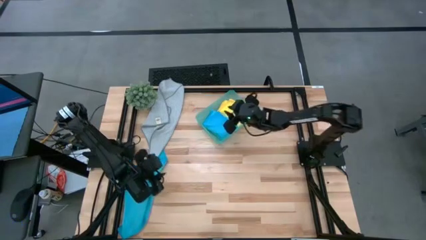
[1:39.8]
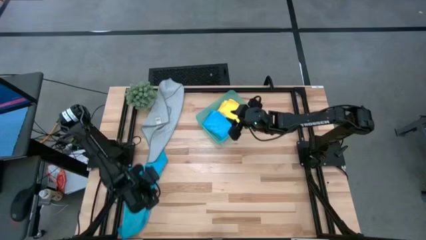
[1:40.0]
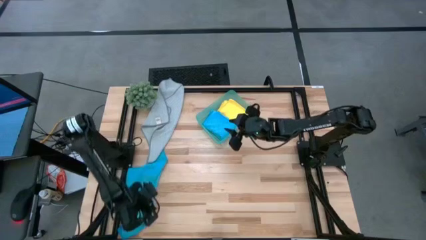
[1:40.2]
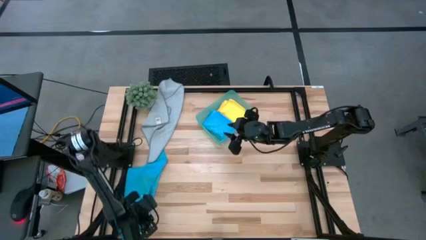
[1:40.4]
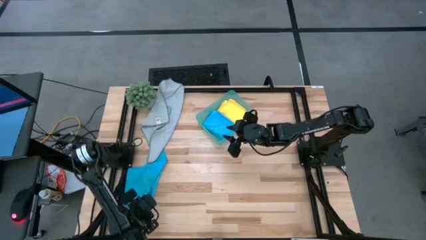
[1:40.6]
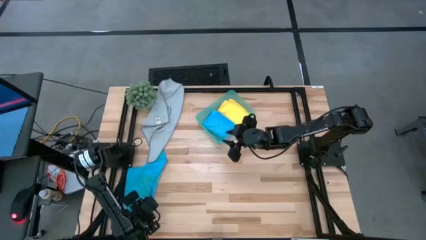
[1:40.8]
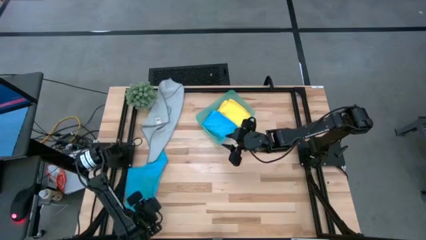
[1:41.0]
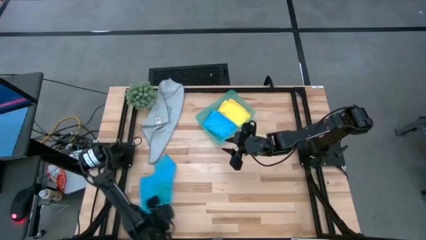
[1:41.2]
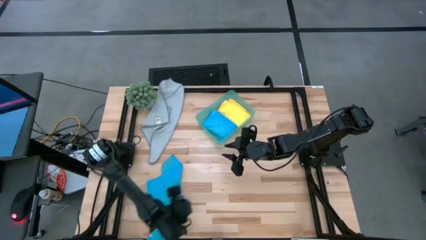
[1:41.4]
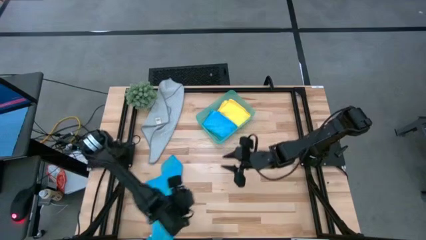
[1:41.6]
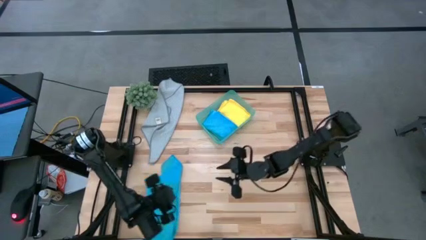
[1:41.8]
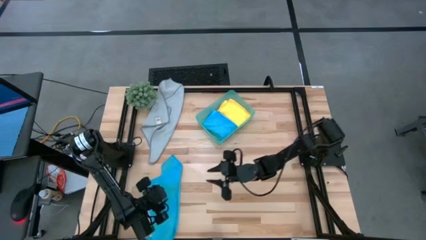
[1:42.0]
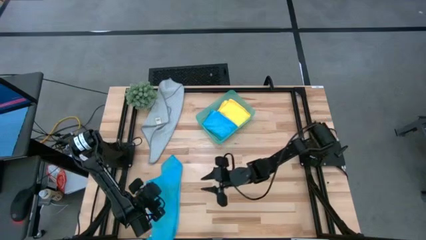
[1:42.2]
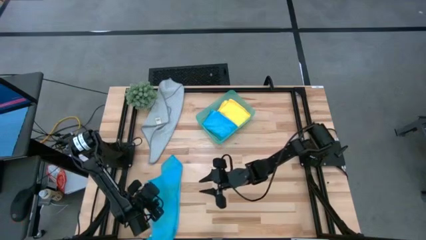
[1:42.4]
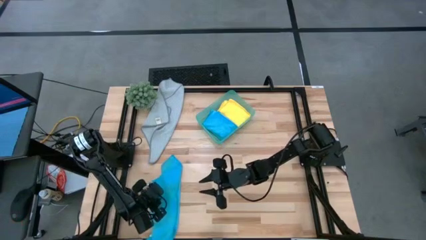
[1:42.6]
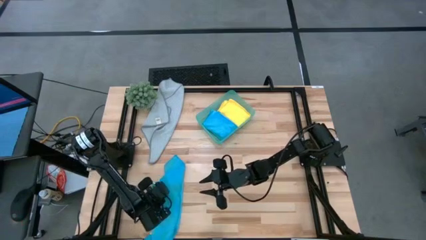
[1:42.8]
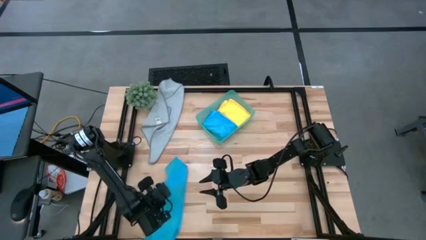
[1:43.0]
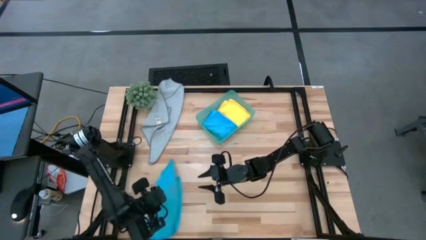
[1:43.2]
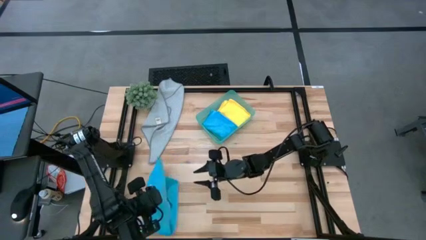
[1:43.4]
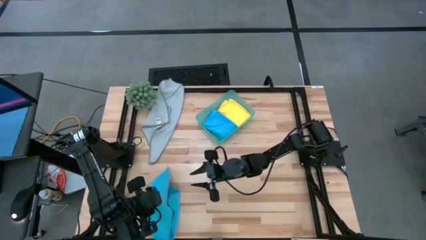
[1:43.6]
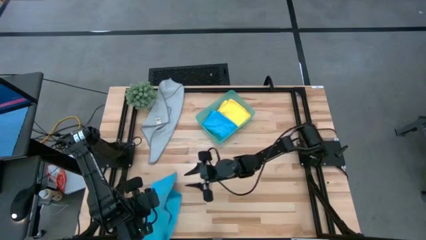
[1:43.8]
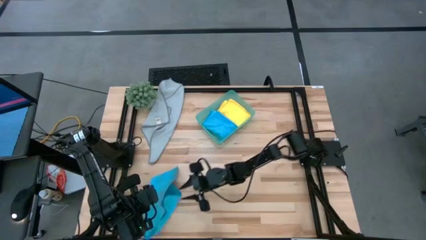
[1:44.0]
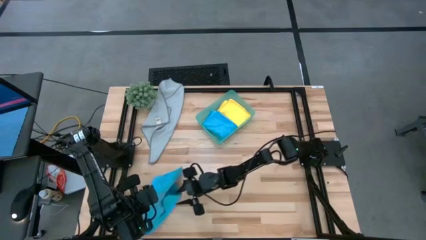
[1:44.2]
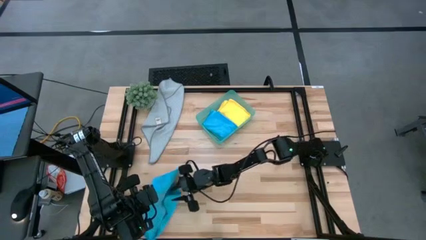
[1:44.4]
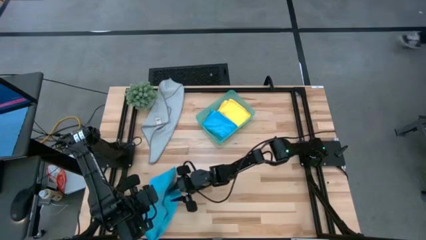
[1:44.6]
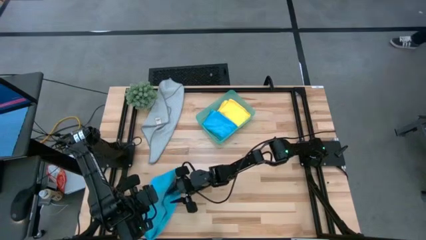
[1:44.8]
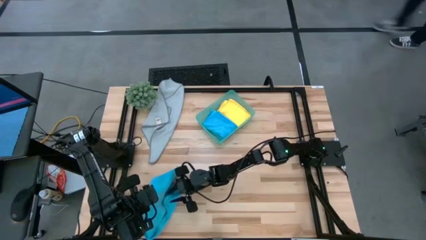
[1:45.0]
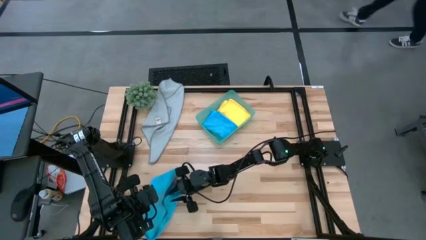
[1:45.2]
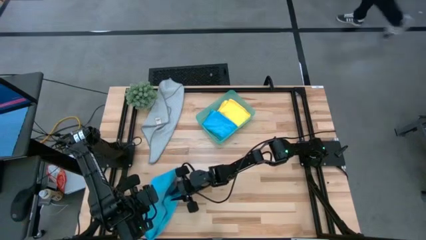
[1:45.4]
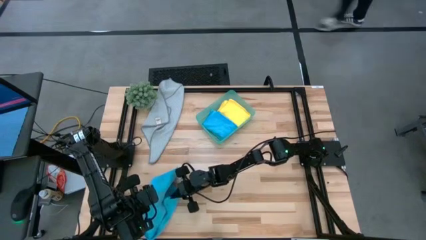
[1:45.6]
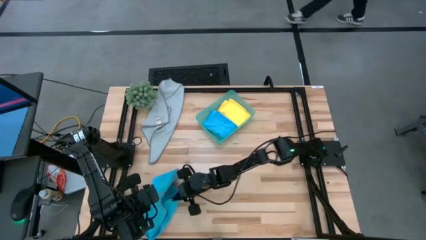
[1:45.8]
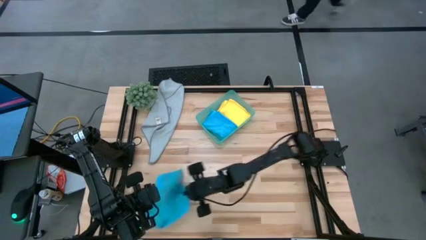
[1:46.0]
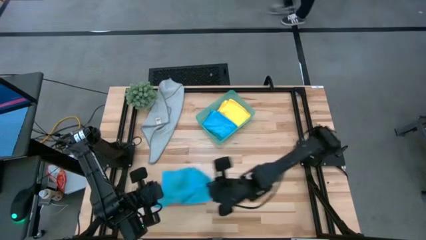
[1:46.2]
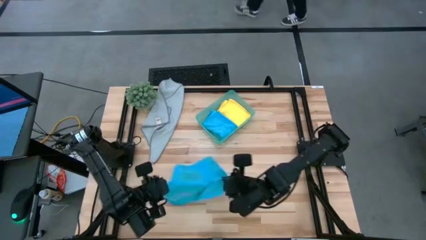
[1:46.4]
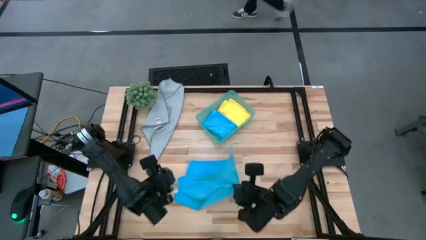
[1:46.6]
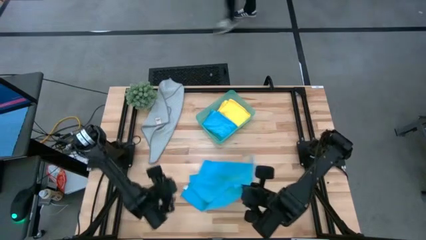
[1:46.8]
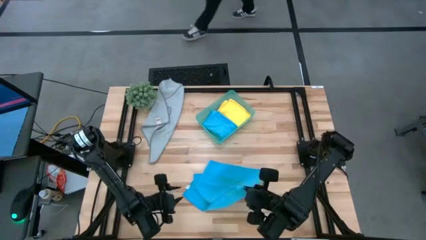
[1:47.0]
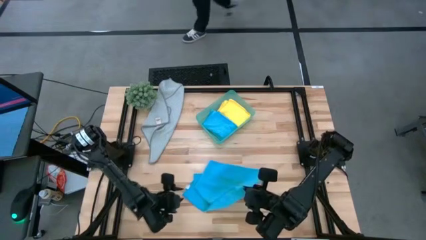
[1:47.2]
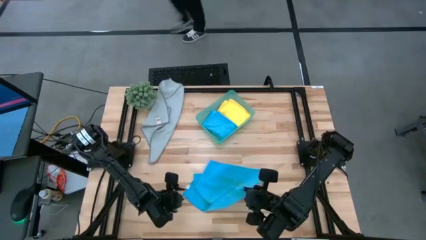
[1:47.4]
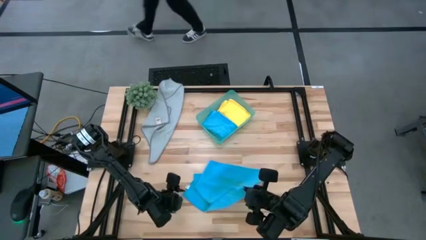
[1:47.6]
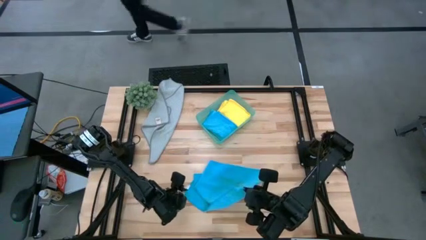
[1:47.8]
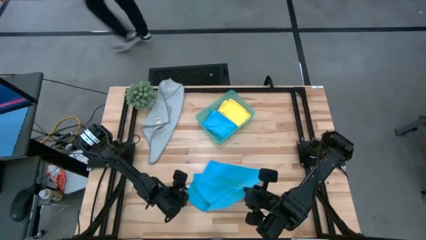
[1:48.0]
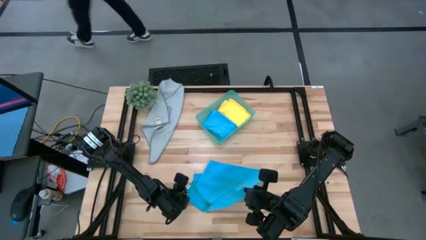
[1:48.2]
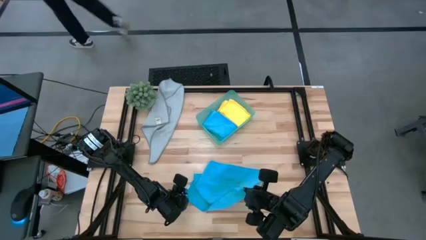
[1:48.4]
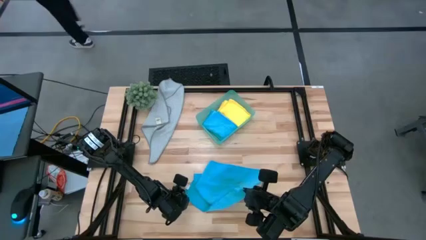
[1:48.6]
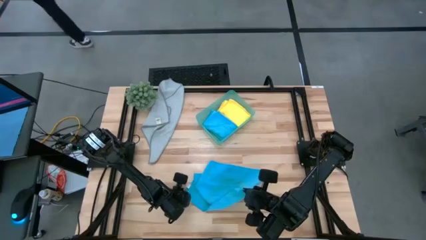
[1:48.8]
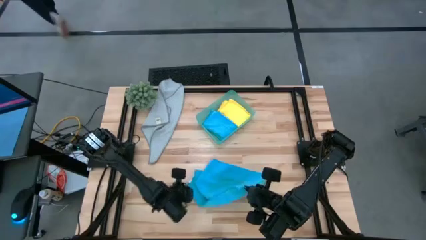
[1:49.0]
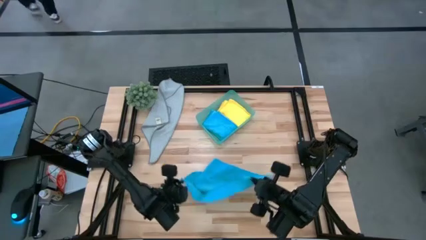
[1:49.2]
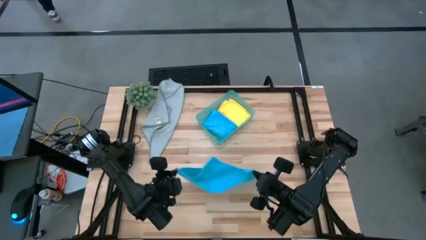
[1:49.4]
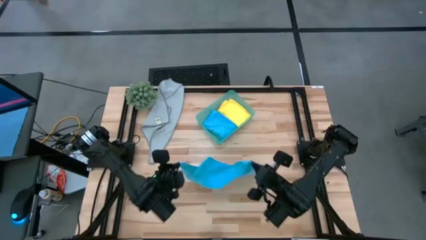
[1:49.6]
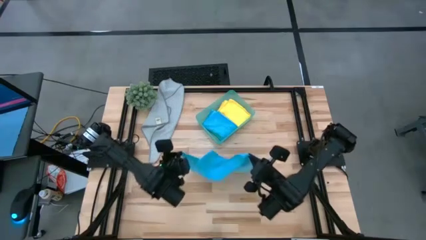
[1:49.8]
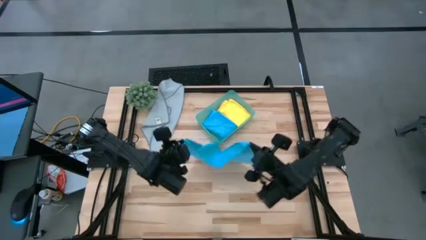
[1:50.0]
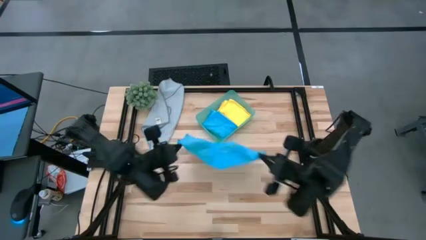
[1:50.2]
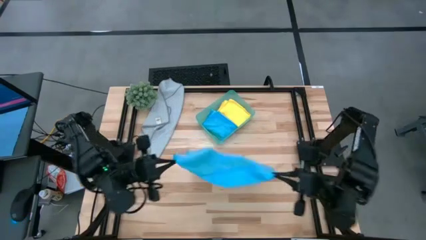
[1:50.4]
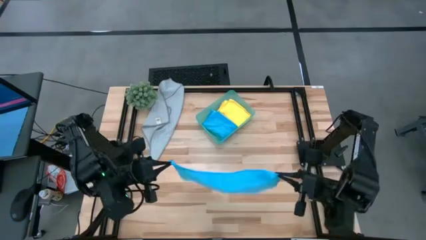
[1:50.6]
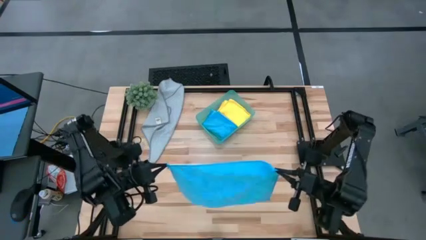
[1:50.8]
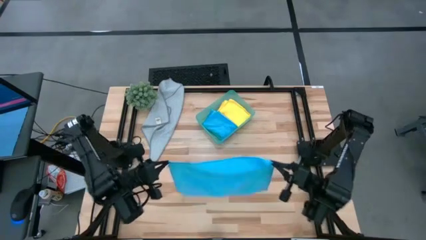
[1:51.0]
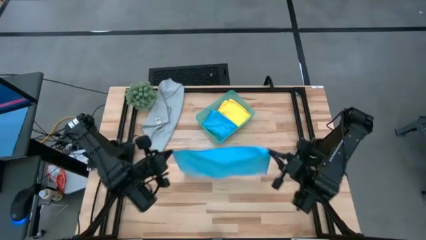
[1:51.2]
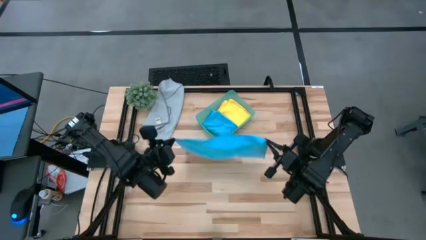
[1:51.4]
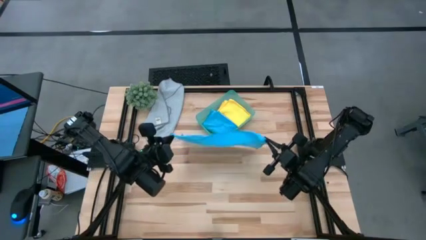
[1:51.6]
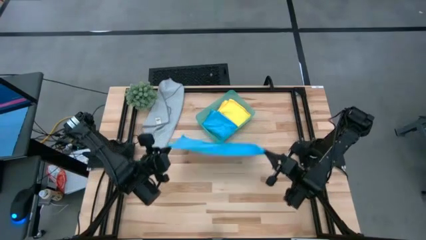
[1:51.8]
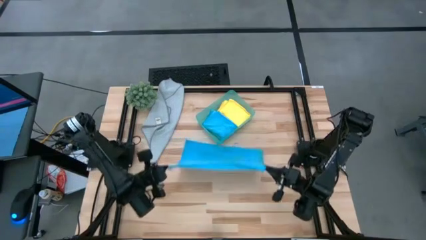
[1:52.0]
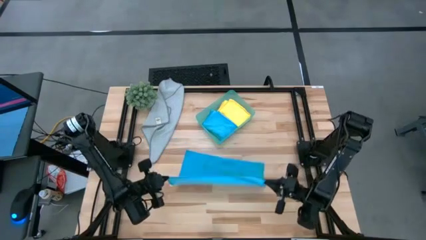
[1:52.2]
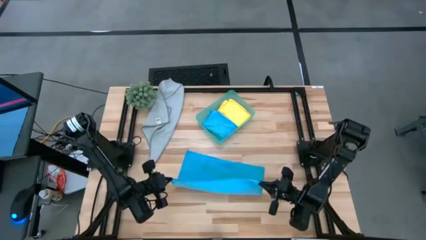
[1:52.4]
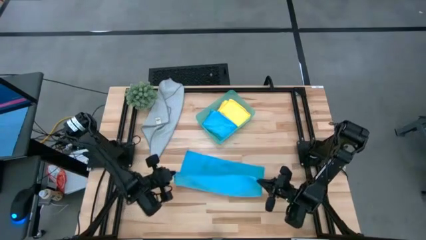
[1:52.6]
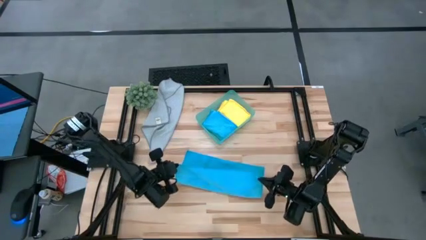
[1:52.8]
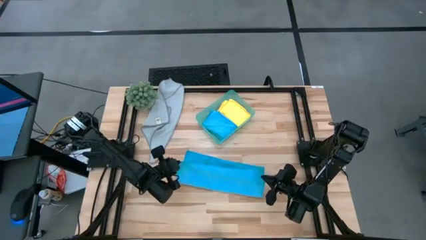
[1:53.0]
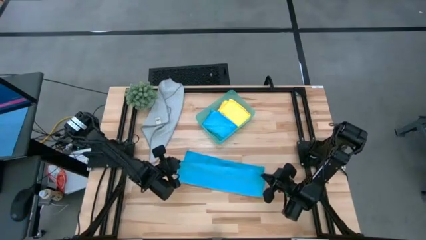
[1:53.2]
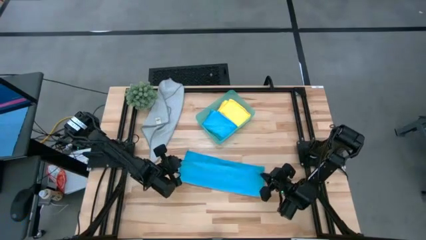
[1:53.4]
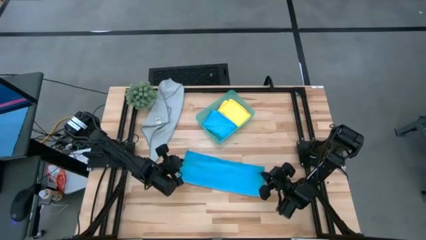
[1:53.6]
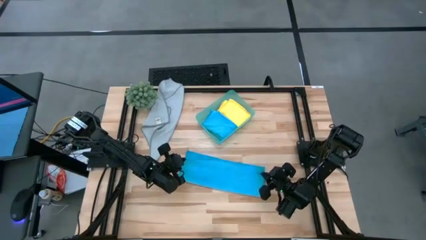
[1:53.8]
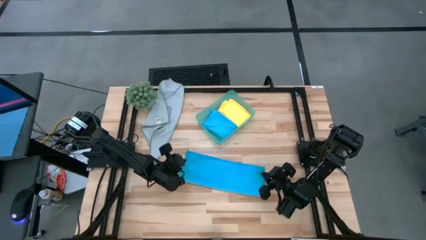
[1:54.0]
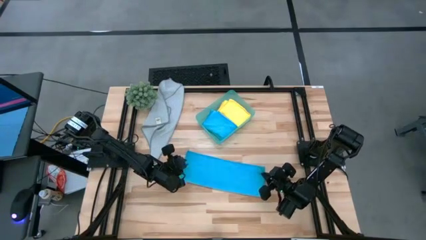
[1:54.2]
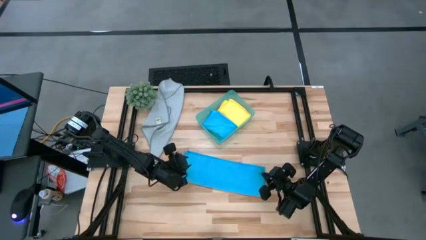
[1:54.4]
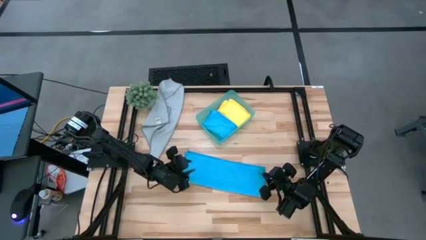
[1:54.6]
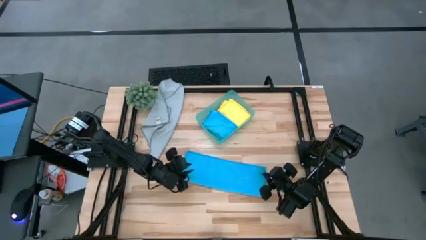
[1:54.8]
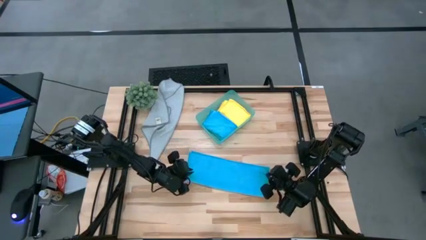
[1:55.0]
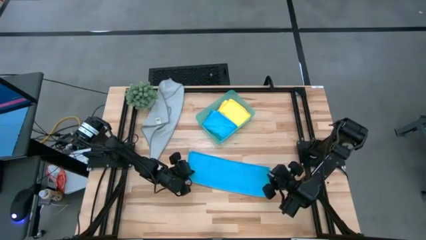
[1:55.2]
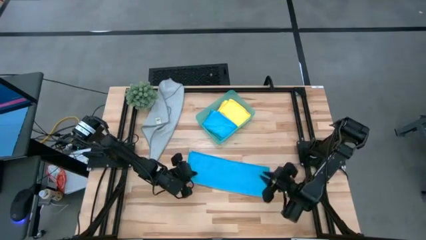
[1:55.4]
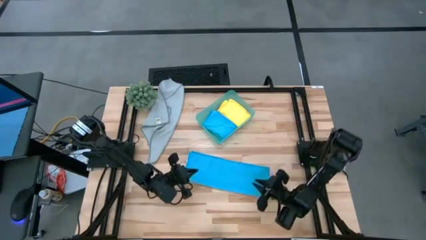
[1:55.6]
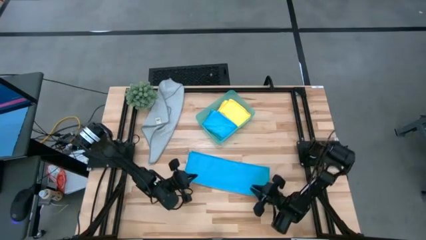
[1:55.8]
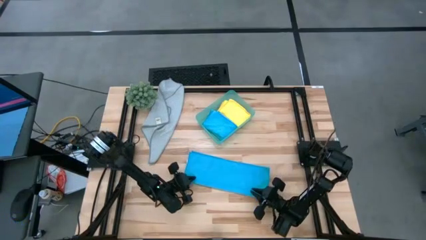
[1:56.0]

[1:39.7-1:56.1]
Task: Fold microfiber towels
Fold the blue microfiber towel

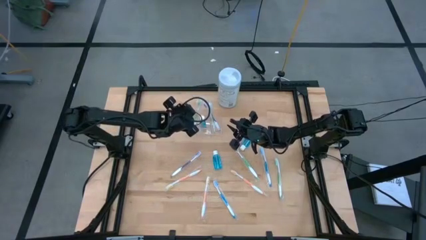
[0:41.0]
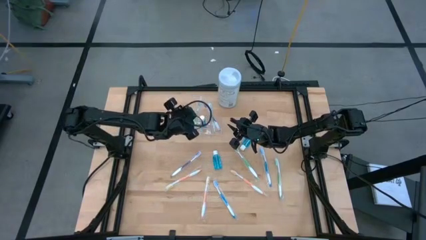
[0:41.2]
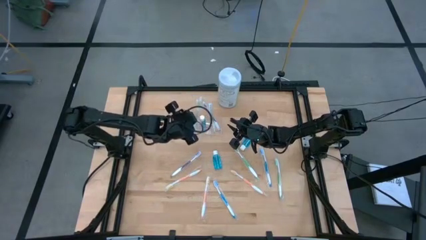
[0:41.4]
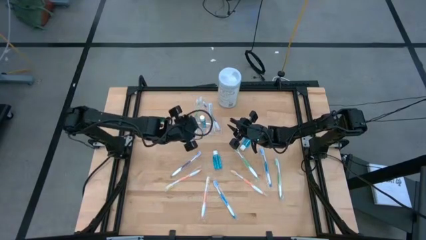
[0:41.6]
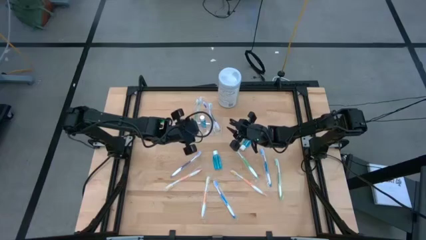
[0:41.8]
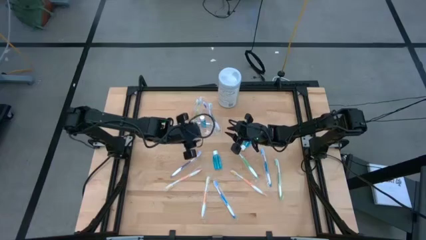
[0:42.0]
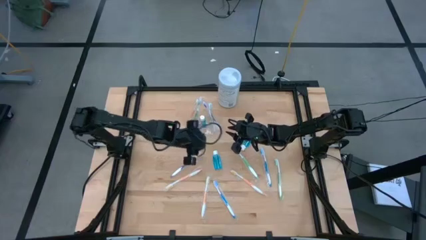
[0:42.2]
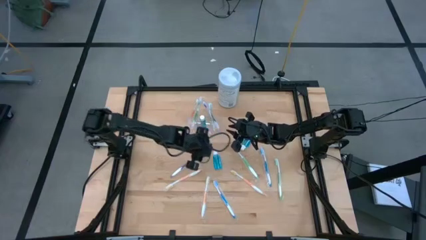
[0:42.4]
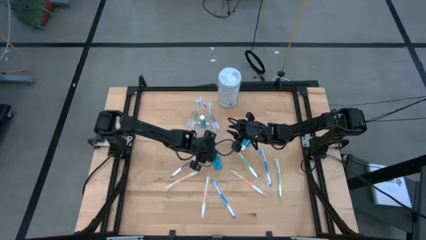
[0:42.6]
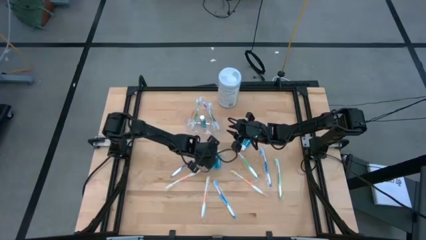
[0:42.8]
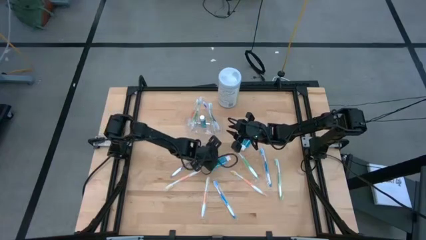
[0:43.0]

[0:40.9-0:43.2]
Task: Pick & Place toothbrushing station
Put the blue mouthwash into the transparent organizer
